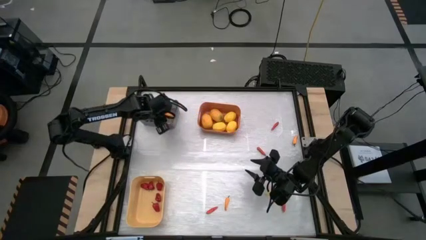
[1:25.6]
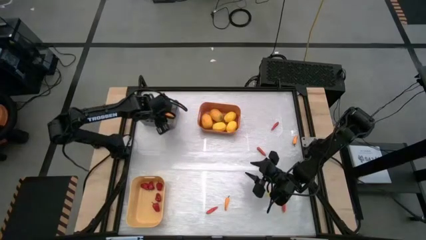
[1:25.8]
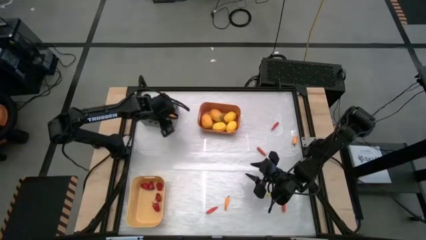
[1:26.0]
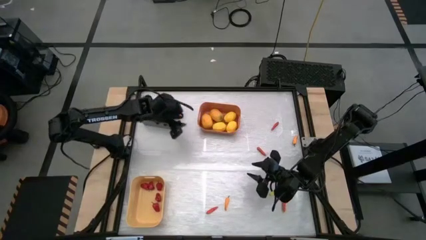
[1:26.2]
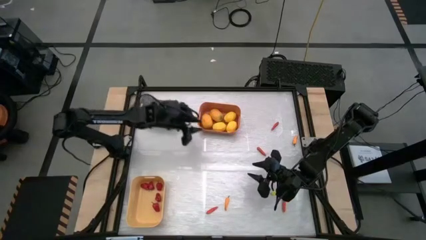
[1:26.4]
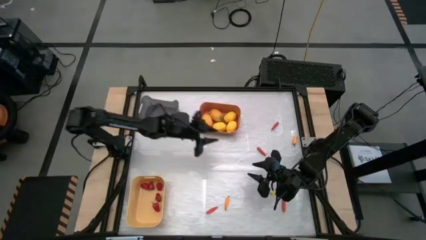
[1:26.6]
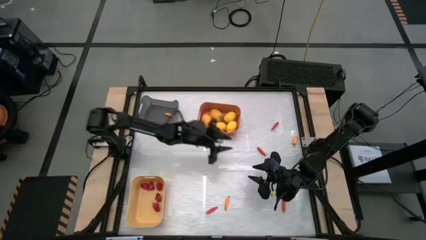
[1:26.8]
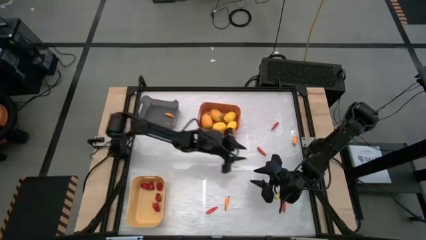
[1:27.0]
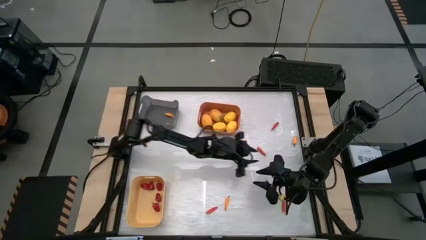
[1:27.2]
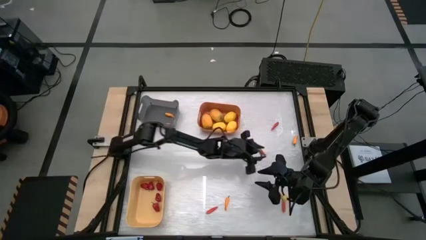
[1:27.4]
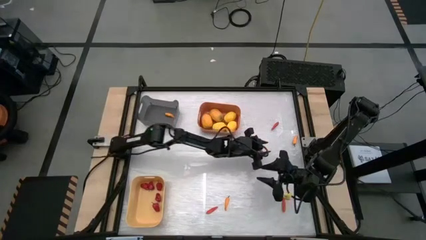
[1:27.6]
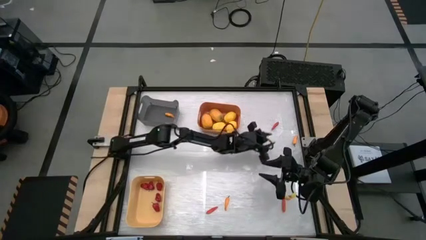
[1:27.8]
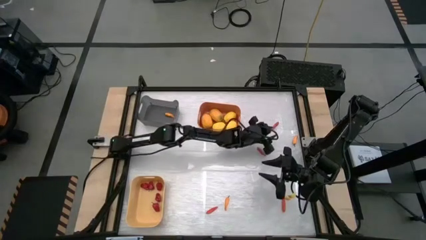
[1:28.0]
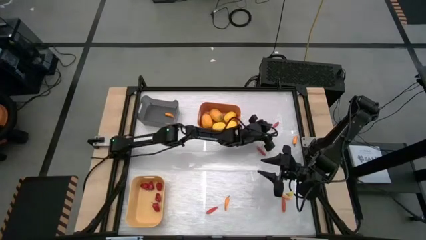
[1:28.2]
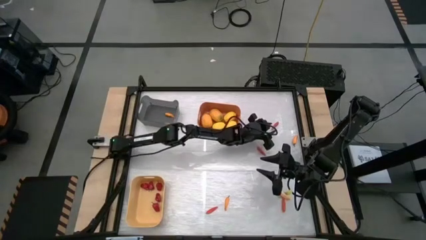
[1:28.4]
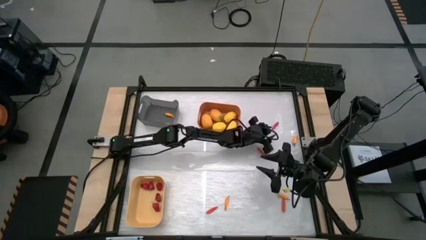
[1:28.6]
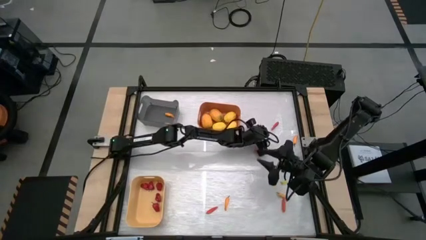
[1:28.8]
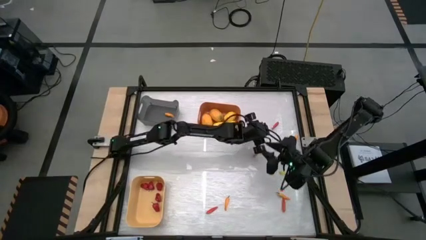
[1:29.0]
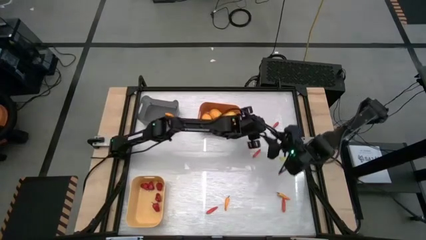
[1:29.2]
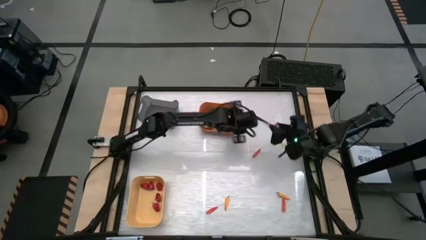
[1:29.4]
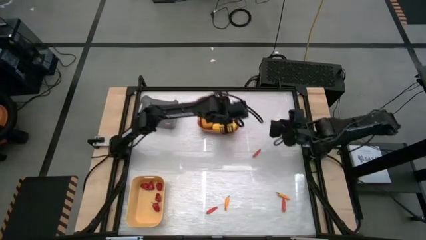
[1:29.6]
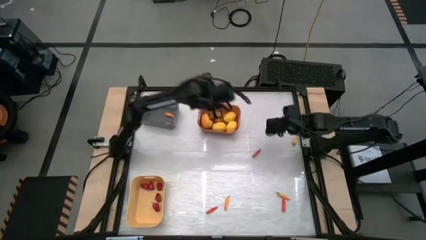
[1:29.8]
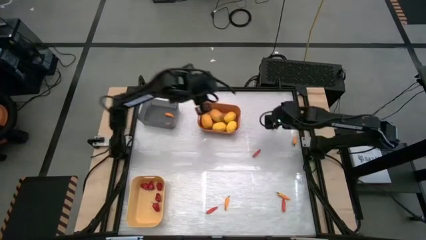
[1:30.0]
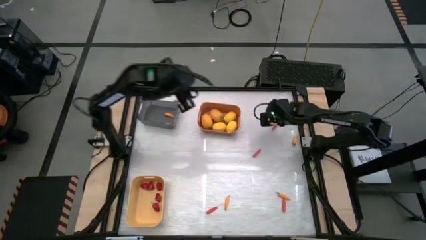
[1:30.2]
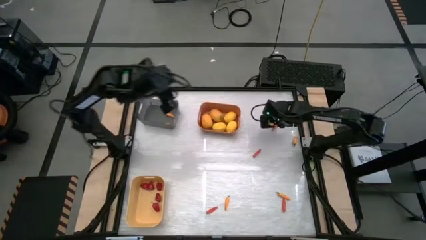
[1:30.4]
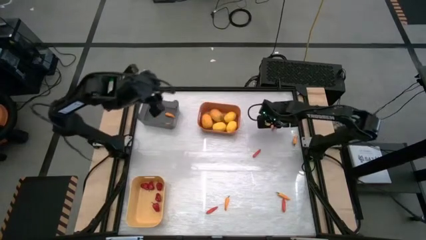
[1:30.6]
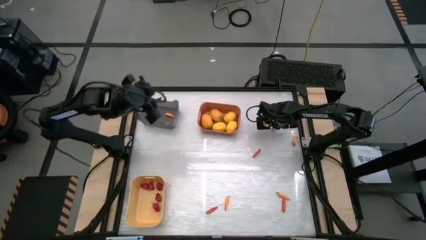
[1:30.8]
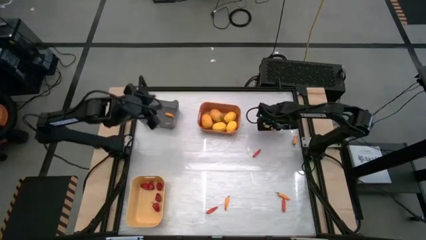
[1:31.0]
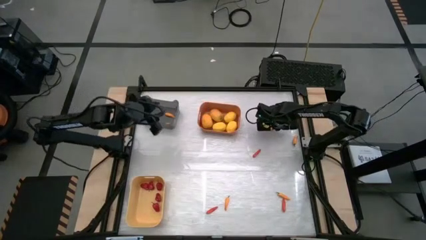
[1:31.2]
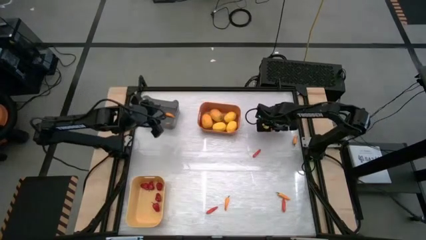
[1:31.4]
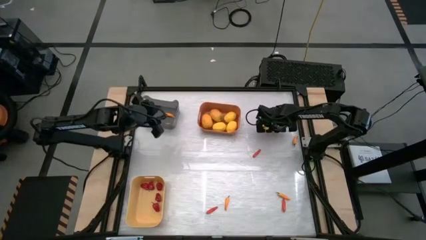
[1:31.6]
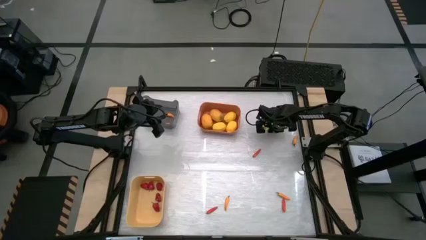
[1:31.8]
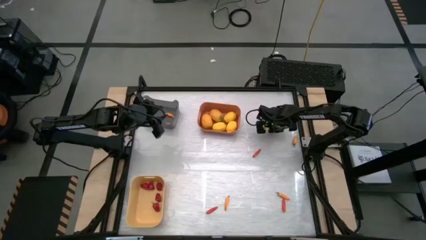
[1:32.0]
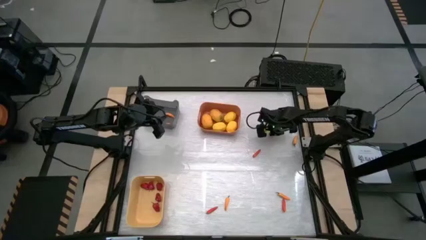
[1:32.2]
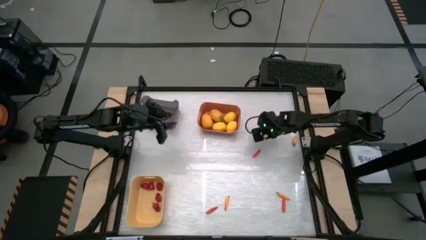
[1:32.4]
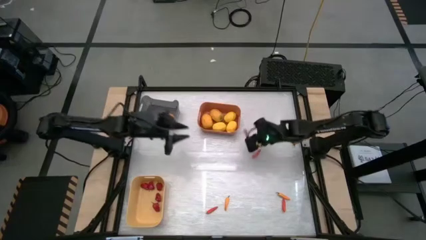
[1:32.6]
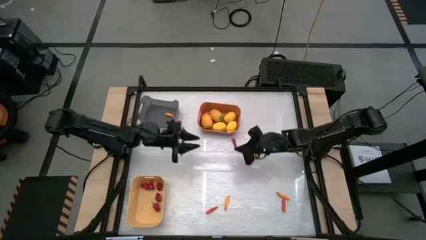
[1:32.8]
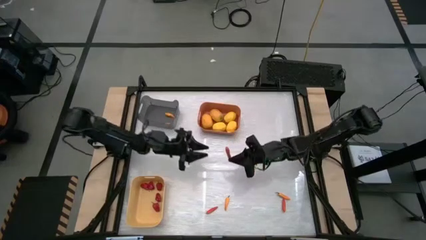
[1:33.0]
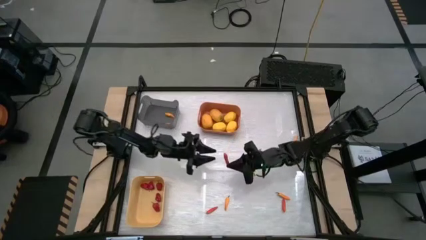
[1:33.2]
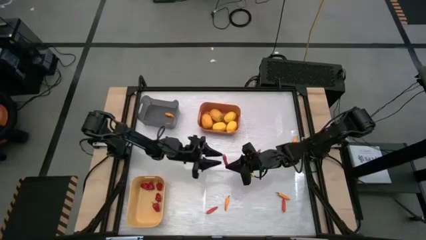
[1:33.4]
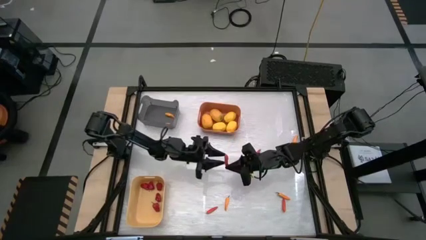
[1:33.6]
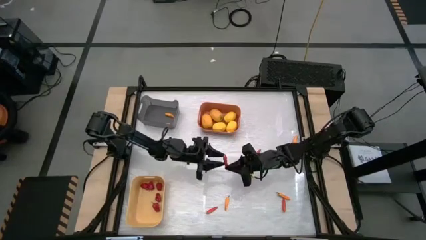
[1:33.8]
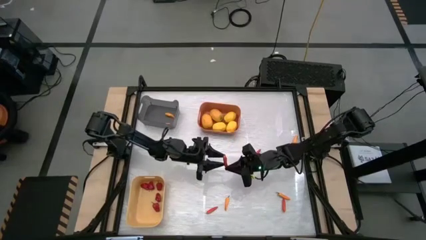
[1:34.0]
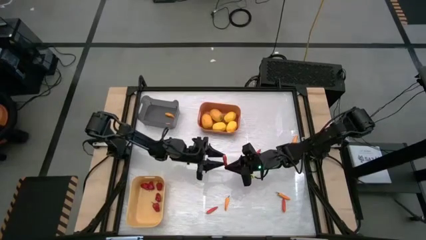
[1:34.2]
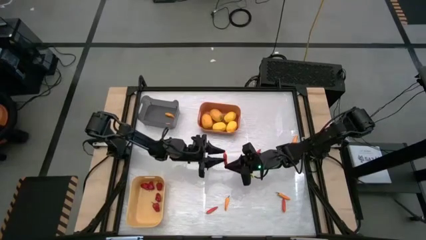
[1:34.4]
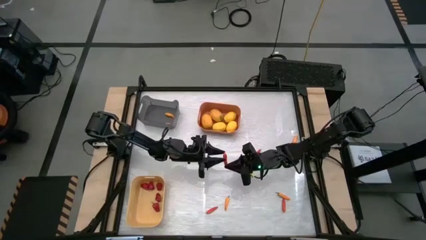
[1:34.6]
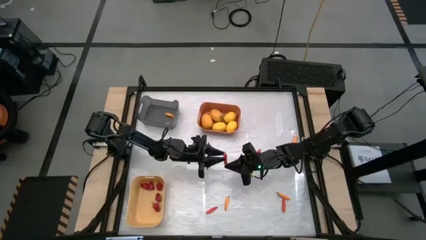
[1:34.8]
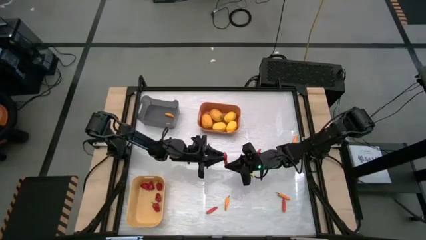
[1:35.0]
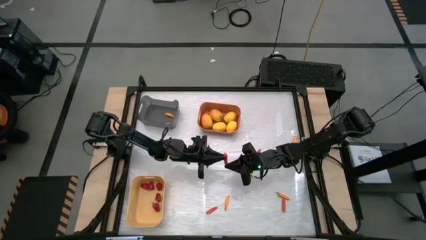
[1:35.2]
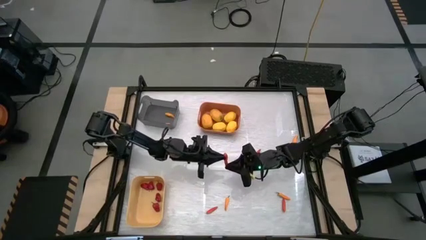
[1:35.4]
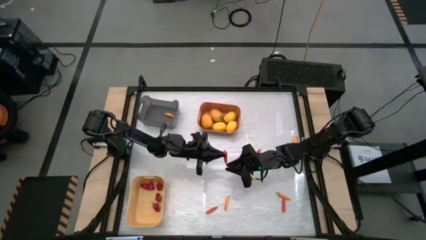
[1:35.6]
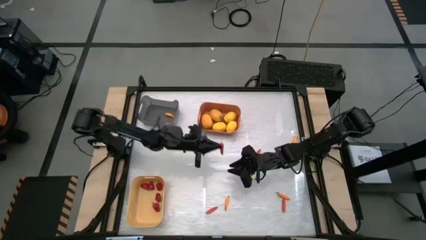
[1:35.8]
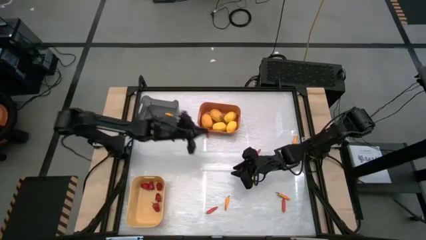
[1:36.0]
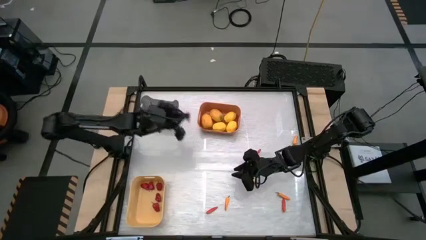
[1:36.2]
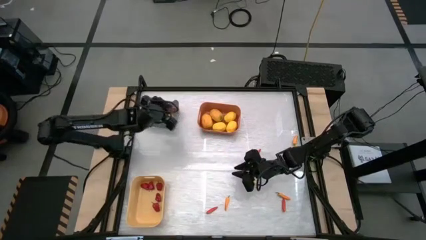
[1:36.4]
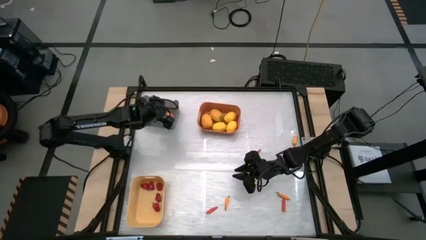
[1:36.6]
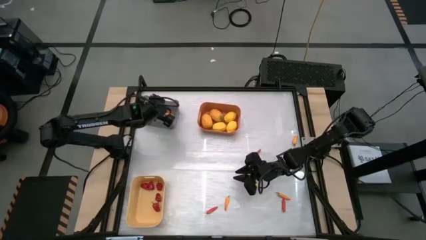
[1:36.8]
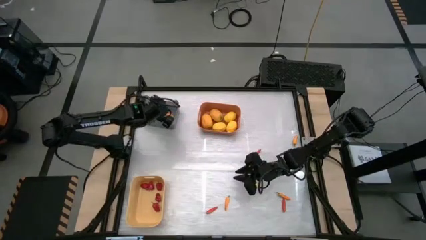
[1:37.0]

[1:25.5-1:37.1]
Task: Sort produce into baskets
Put the orange chili pepper into the black bin

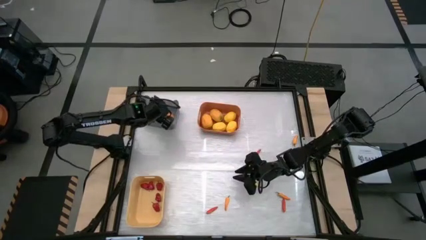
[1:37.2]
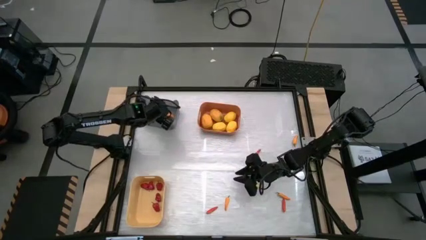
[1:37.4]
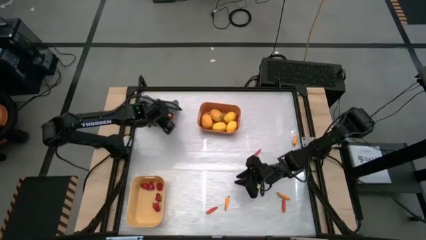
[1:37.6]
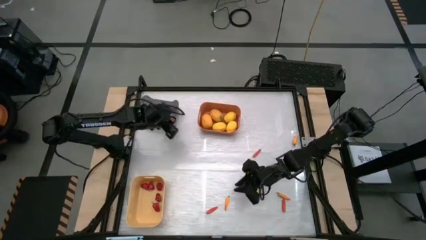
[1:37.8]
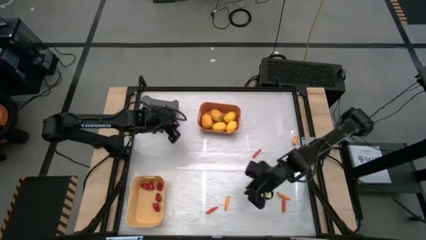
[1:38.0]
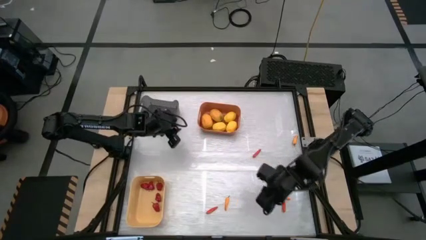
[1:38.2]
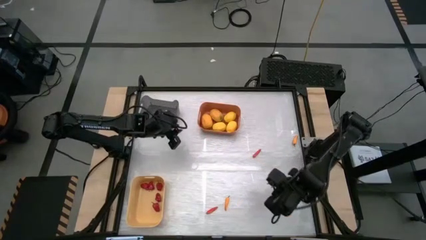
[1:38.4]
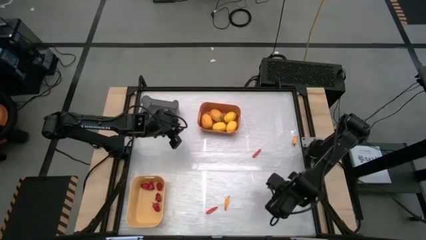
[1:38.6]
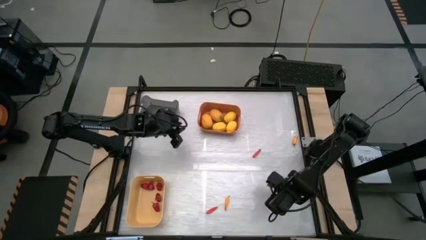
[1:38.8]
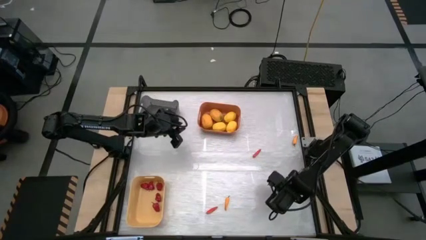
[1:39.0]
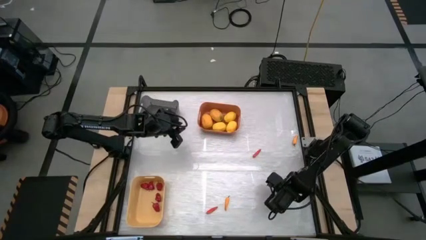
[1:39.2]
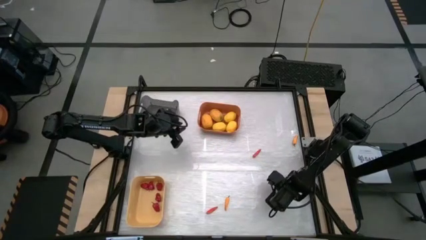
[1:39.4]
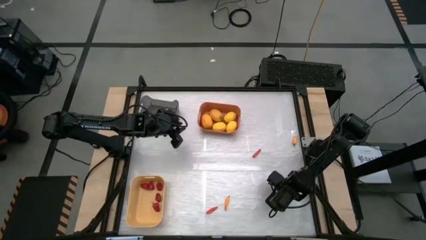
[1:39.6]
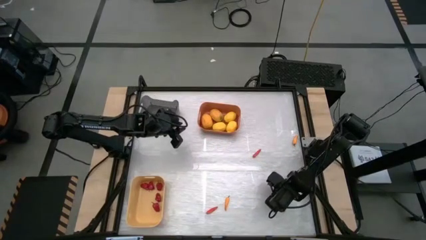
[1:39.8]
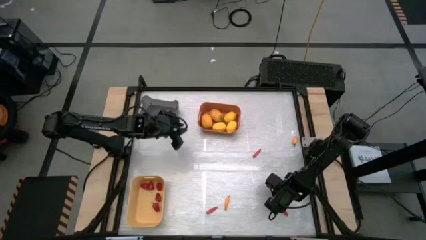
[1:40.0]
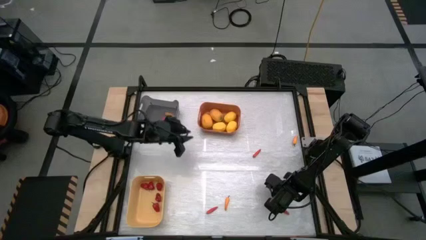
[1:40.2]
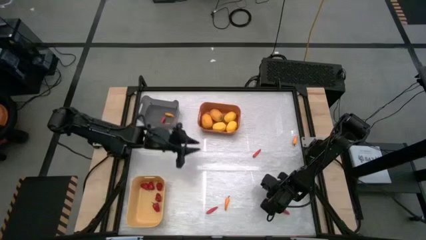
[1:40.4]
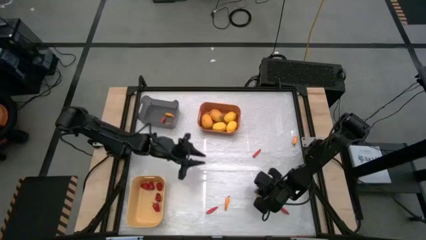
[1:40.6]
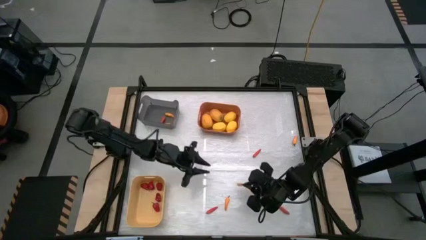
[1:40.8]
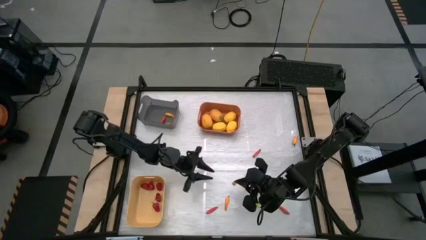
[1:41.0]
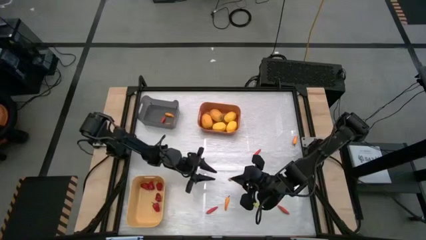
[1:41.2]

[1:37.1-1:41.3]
Put the yellow chili pepper into the black bin

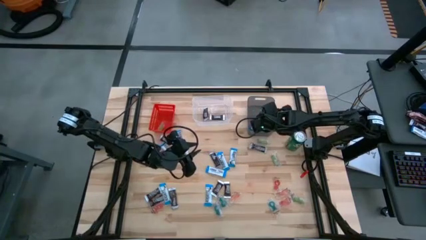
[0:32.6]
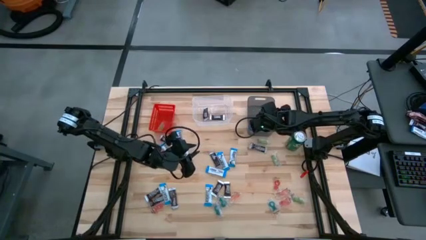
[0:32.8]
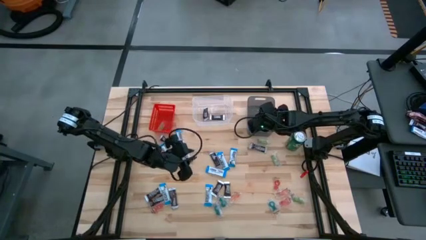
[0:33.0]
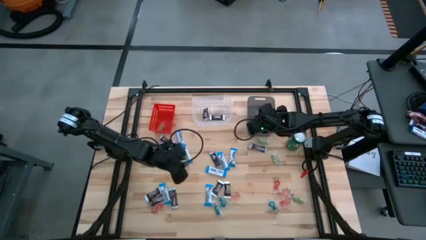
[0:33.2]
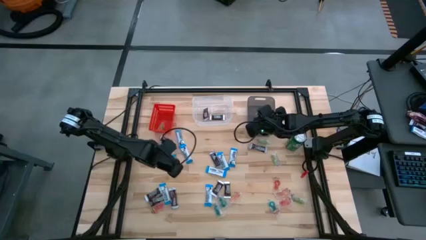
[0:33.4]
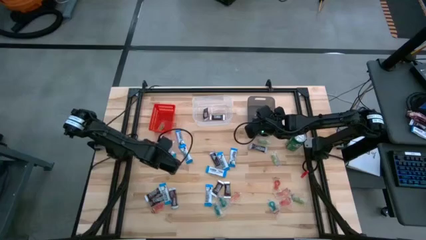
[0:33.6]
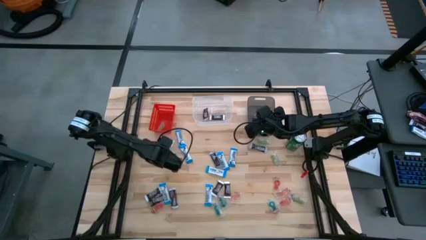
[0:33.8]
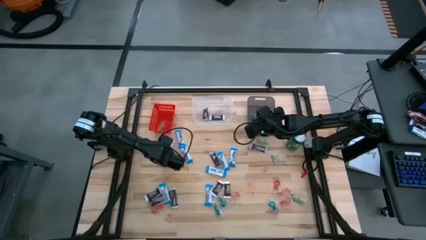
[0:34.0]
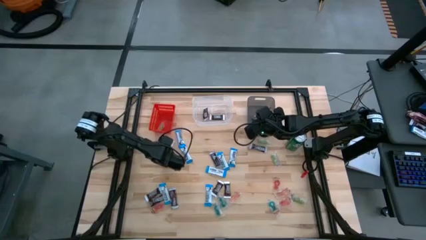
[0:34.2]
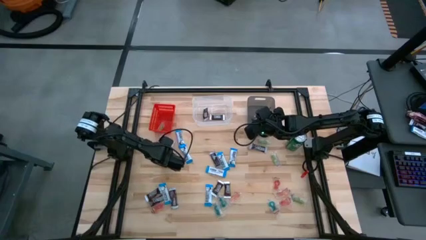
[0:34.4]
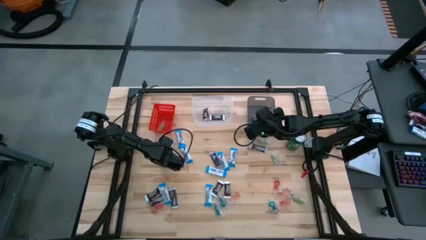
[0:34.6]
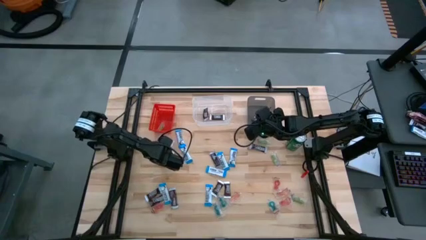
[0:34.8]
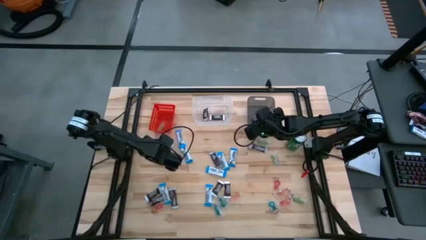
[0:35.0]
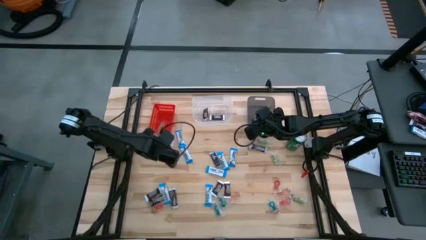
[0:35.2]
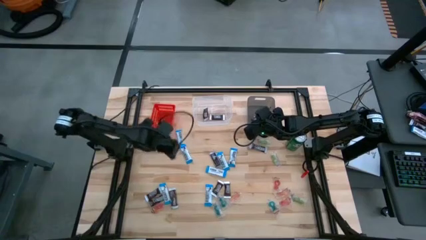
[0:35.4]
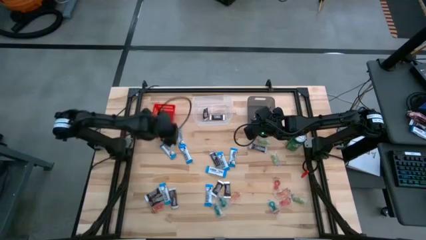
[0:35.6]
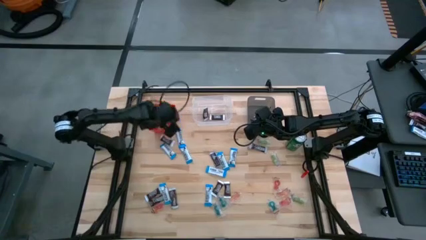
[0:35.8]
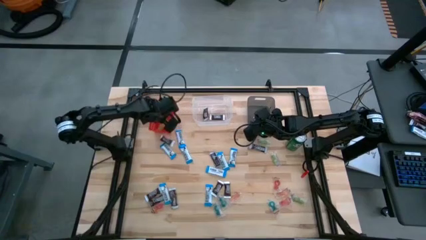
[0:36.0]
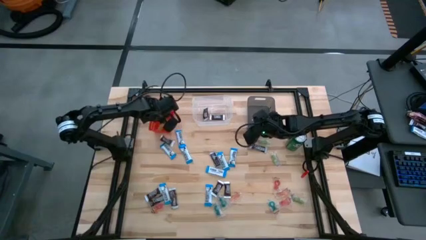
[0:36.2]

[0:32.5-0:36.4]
Task: Sort candy
Put the red candy into the red bin
